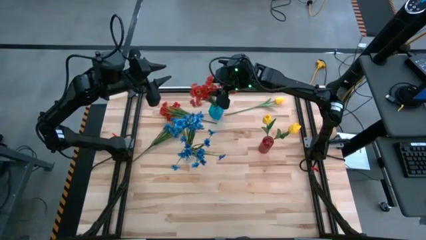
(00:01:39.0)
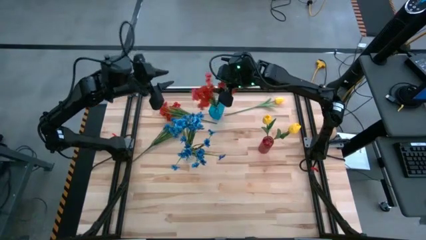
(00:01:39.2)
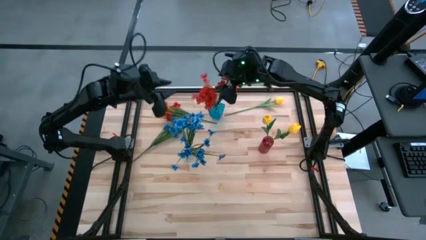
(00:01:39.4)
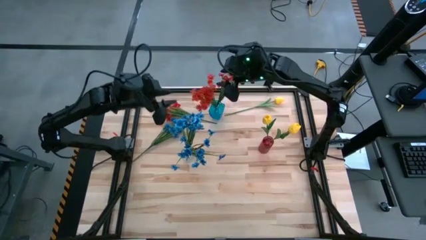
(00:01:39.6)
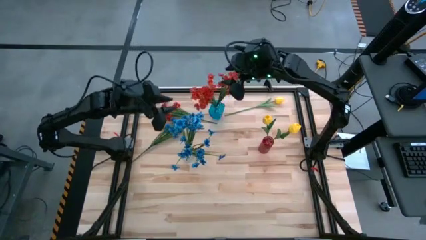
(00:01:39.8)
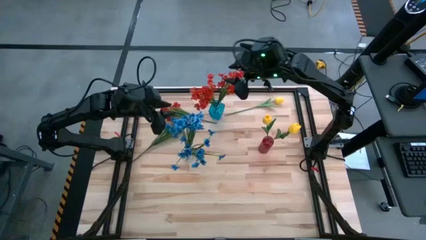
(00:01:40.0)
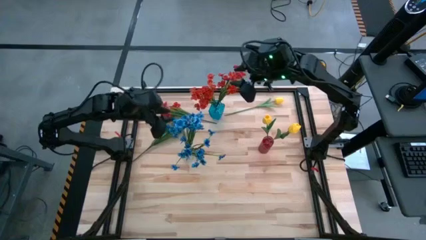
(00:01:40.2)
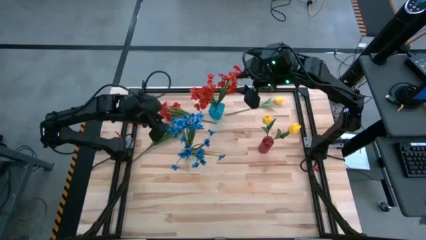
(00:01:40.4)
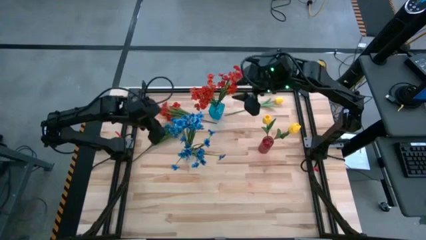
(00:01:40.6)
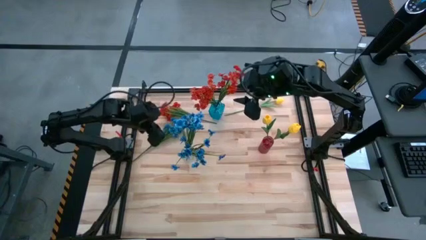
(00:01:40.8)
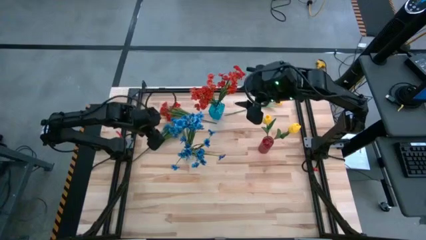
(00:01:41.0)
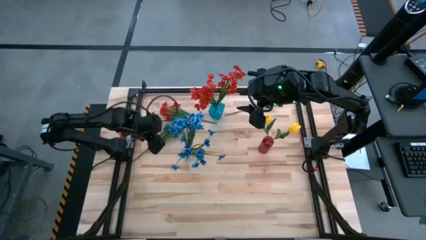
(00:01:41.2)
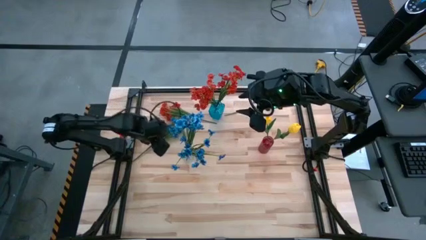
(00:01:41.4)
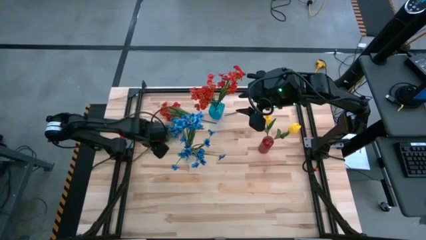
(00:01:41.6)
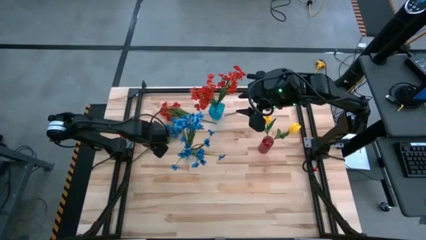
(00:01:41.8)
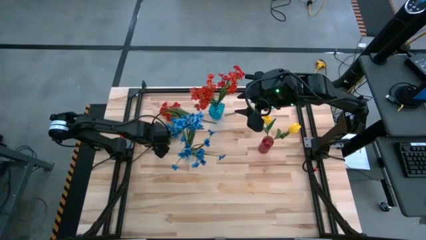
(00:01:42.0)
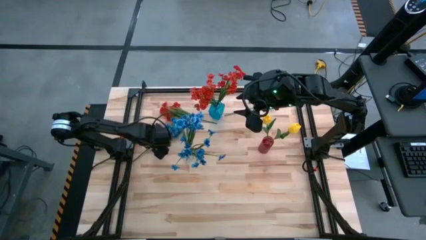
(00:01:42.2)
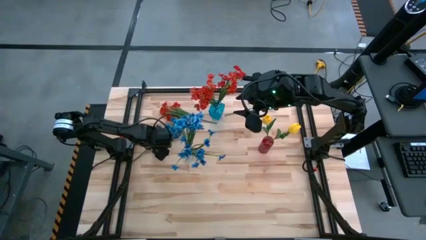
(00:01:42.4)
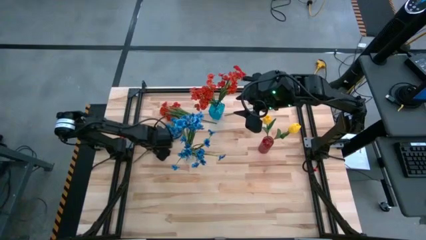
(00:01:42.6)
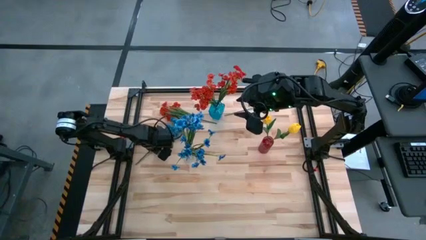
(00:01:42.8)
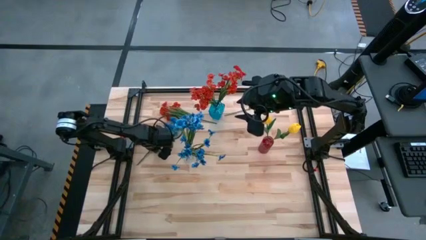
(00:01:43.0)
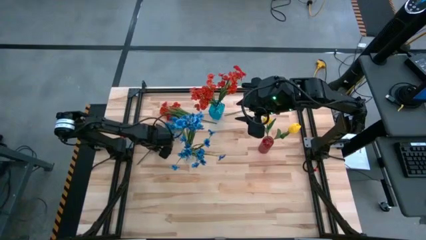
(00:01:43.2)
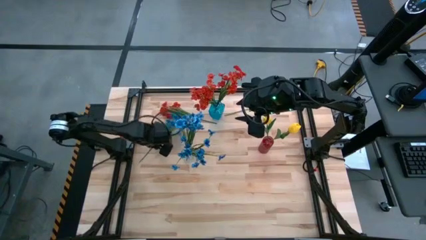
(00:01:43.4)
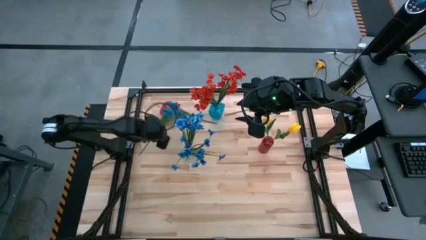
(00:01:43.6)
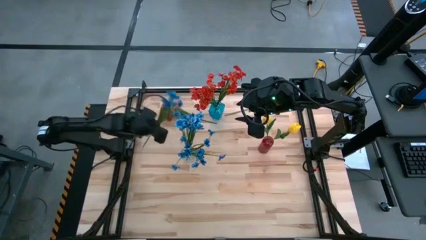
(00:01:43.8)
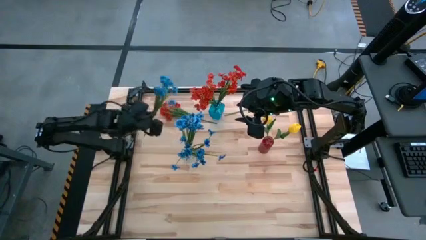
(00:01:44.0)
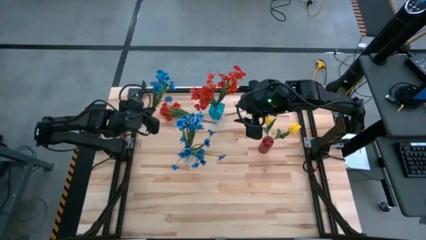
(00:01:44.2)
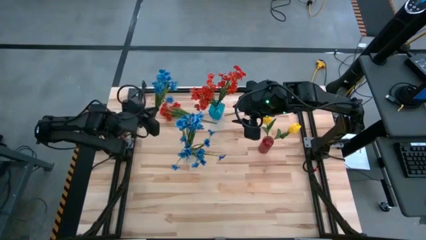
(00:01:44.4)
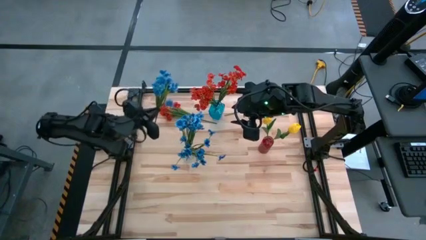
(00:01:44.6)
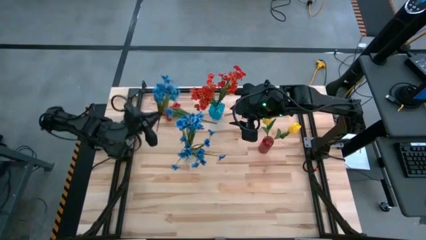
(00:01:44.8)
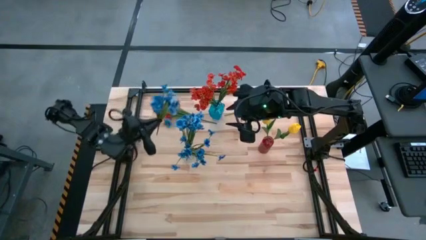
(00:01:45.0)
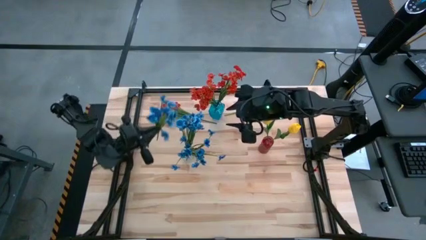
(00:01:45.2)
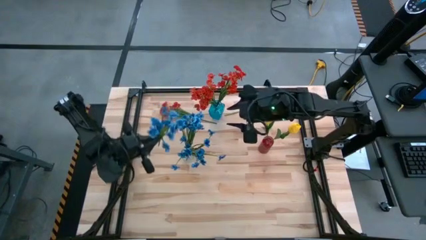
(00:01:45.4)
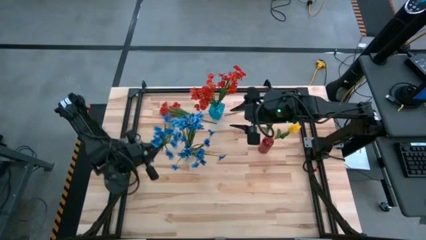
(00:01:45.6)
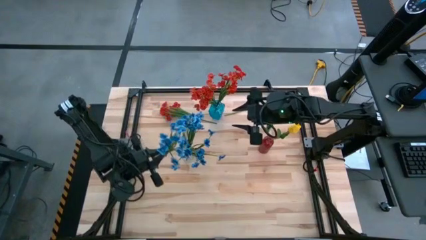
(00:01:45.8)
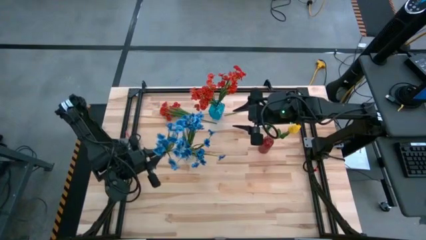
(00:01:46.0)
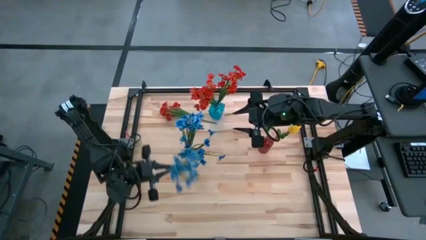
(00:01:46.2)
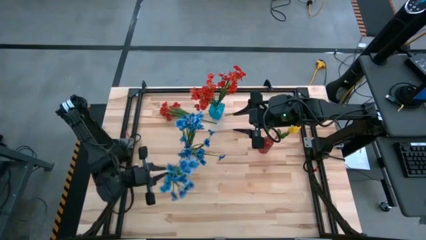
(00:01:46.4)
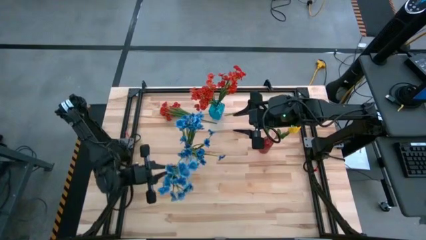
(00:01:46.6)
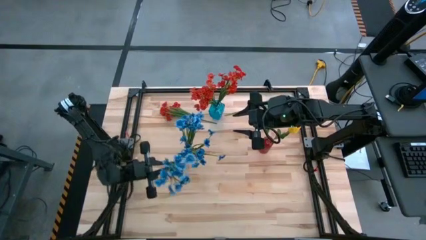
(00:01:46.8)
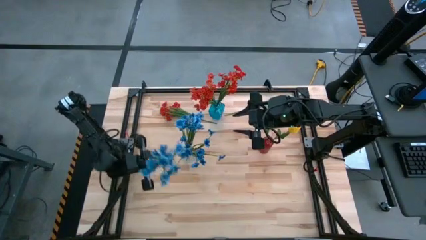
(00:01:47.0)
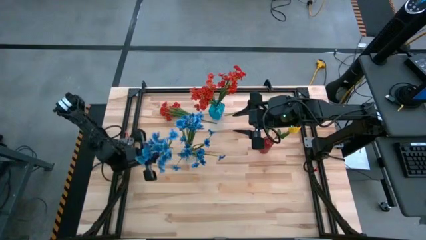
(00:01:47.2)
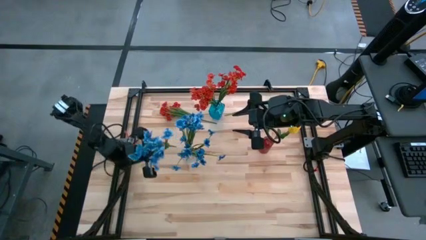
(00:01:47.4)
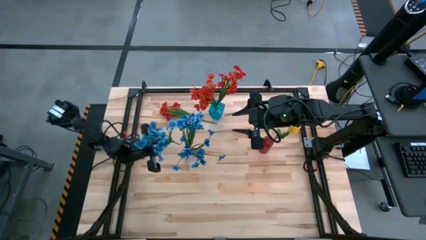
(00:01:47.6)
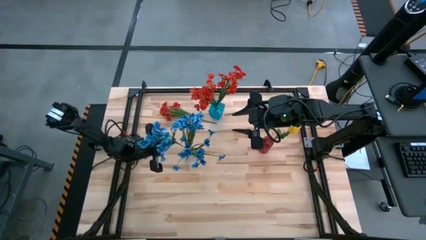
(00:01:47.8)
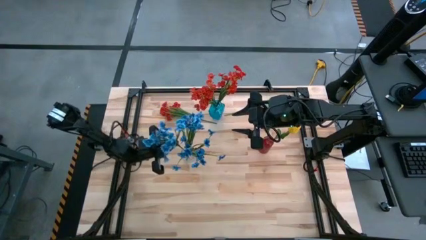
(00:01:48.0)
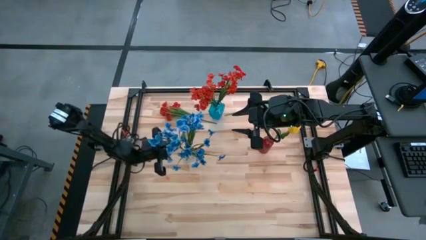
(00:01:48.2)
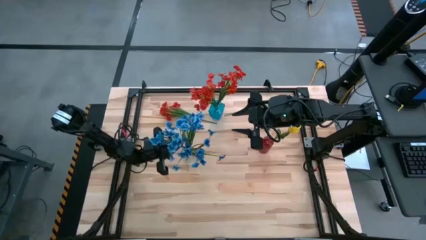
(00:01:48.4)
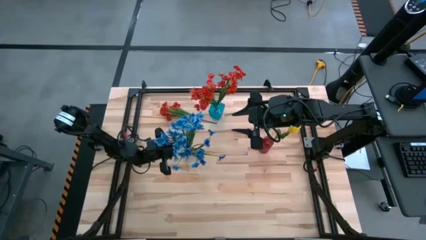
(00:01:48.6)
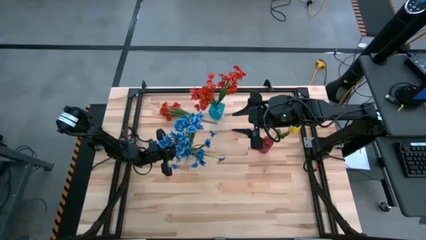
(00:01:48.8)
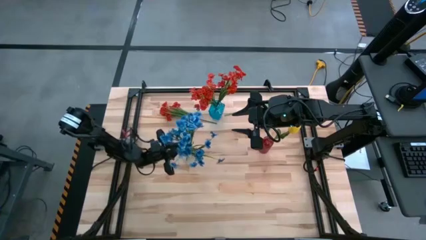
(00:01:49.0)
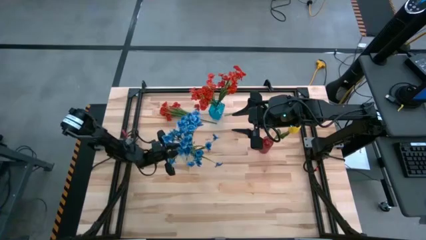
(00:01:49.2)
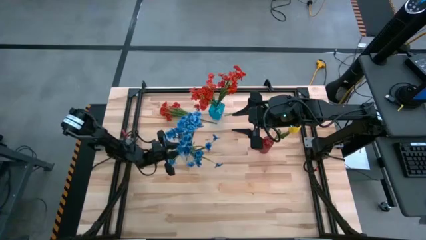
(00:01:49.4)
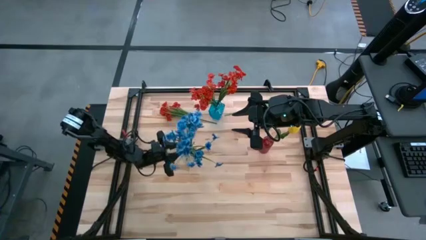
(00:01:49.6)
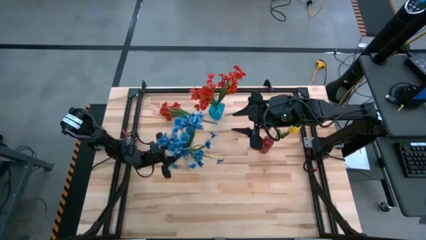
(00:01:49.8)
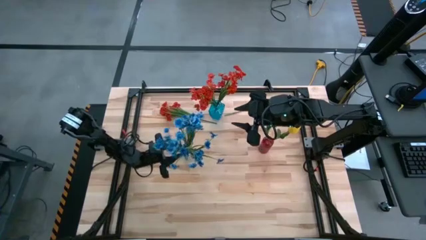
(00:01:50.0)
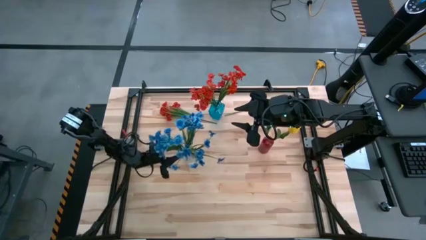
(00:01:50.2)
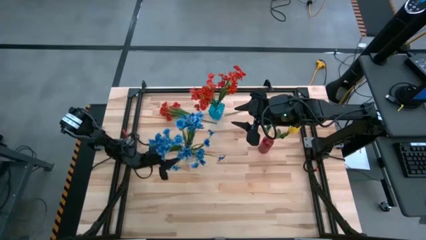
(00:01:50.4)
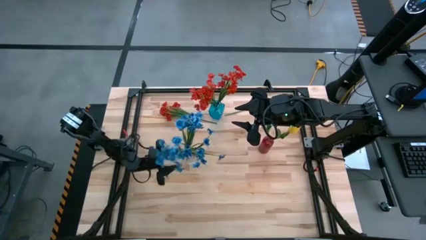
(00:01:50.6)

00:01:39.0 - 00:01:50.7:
Task: Sort flowers into vase by color
Put the blue flowers into the transparent vase
